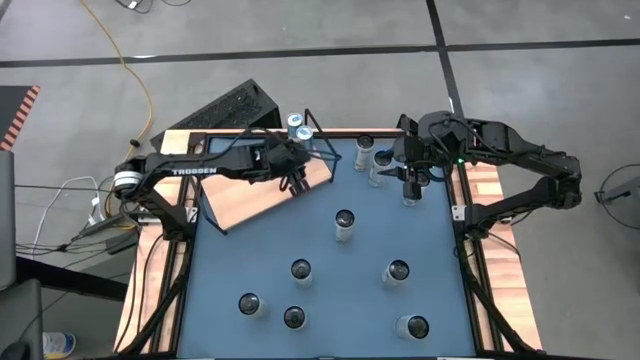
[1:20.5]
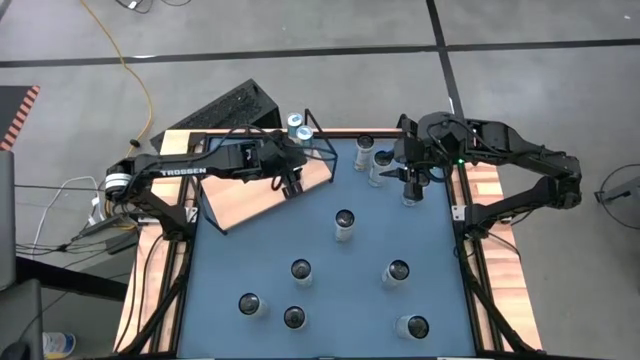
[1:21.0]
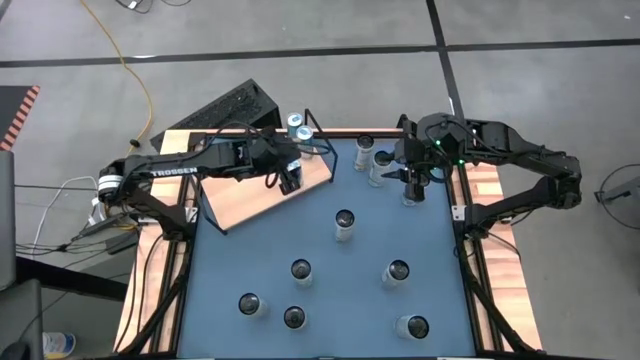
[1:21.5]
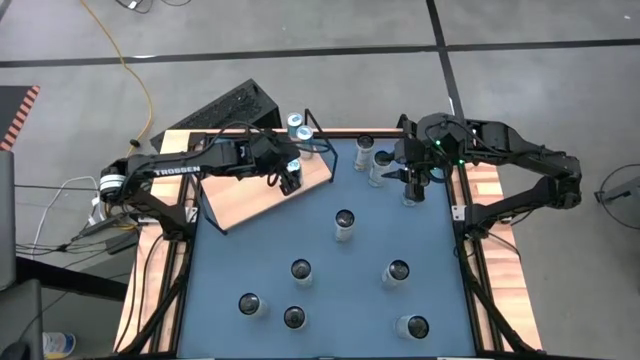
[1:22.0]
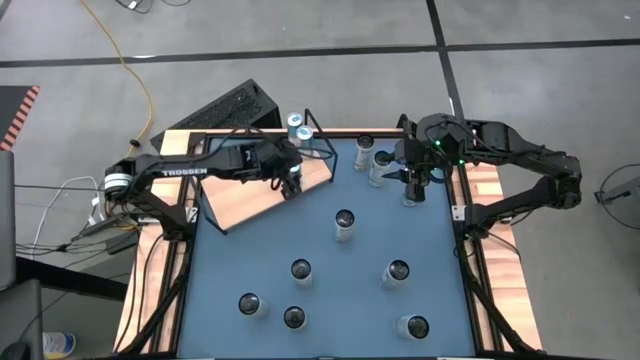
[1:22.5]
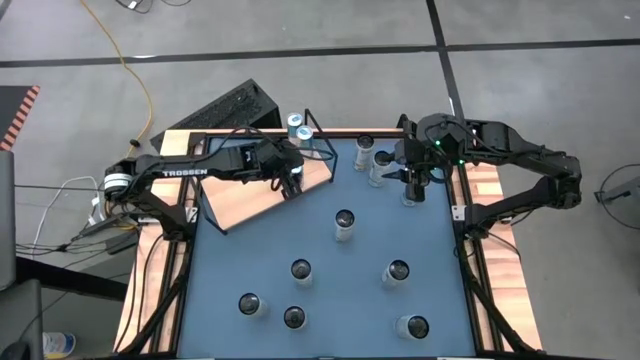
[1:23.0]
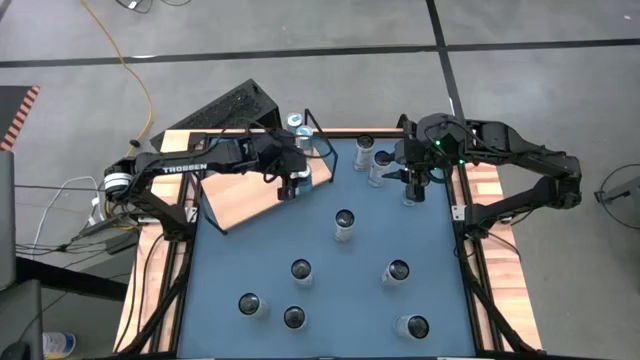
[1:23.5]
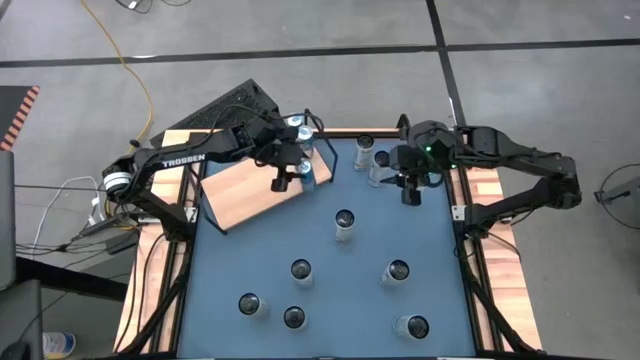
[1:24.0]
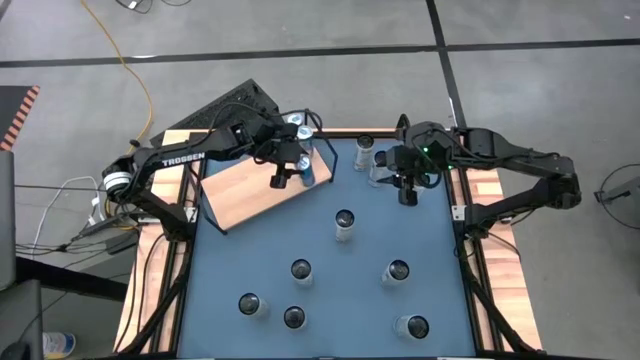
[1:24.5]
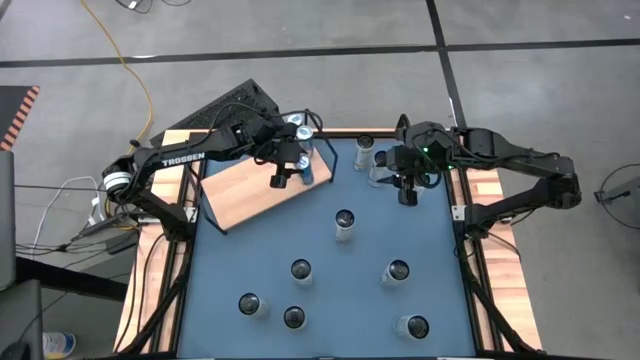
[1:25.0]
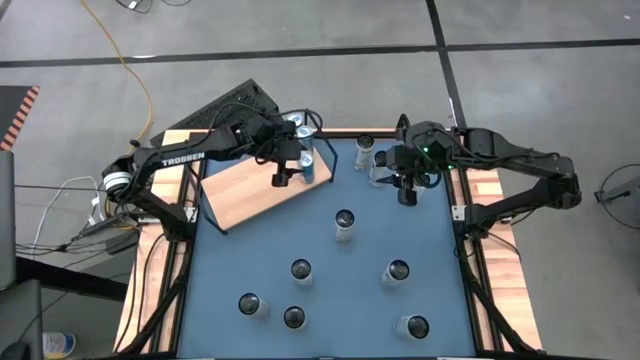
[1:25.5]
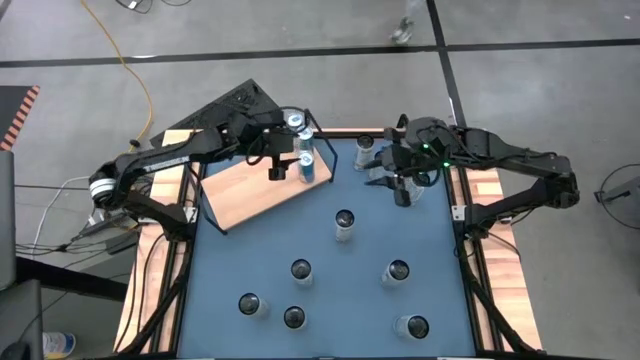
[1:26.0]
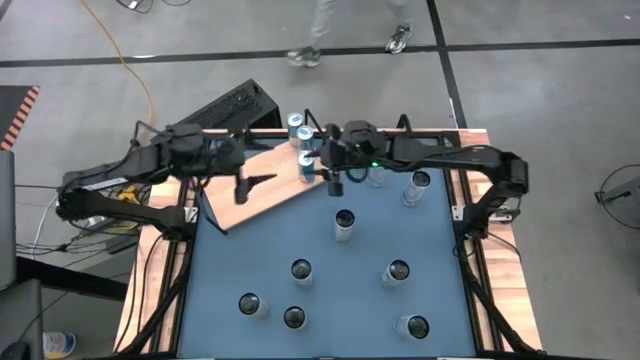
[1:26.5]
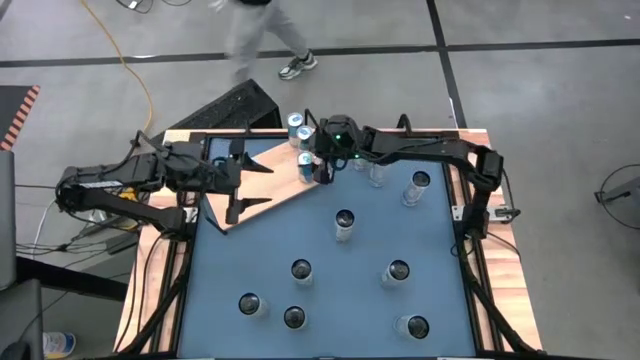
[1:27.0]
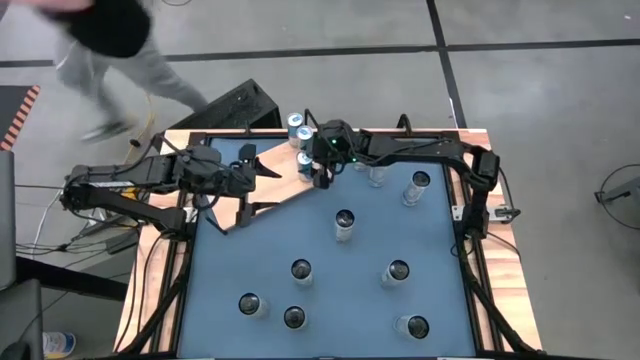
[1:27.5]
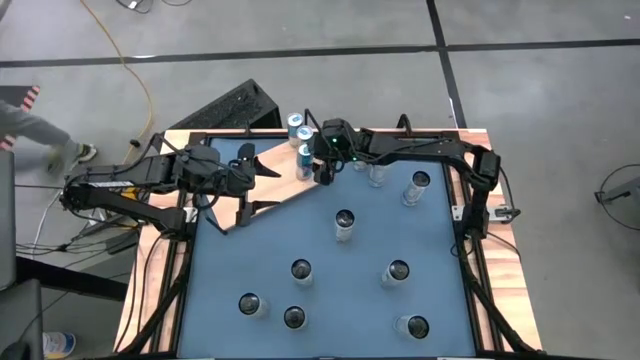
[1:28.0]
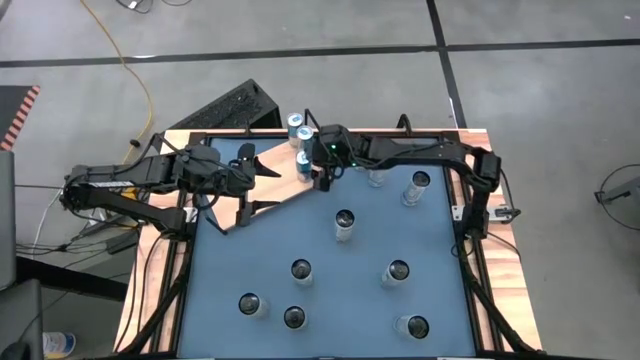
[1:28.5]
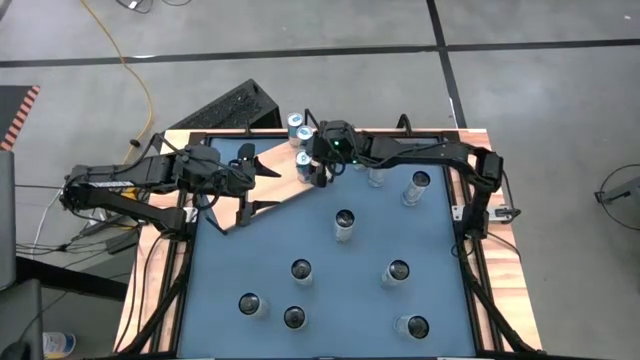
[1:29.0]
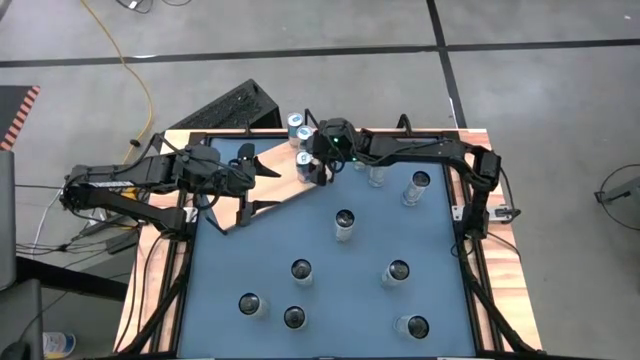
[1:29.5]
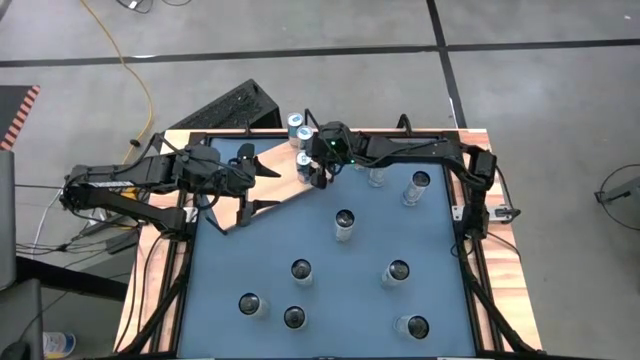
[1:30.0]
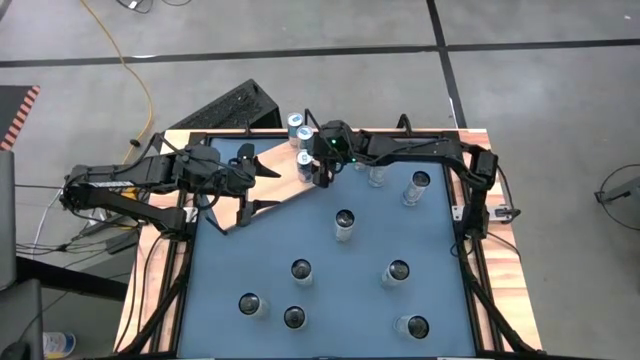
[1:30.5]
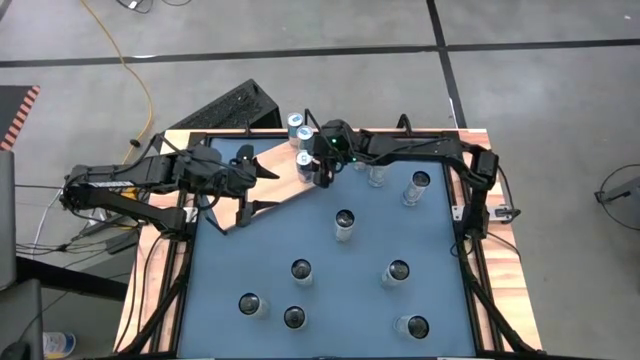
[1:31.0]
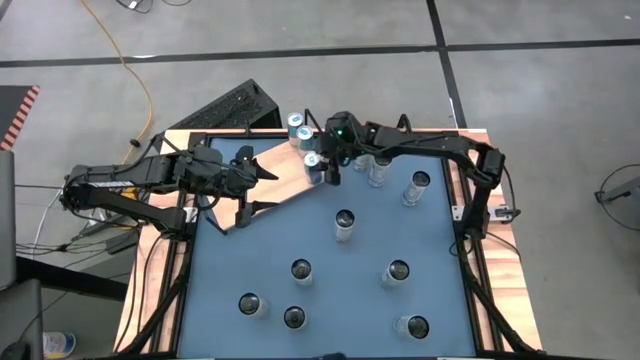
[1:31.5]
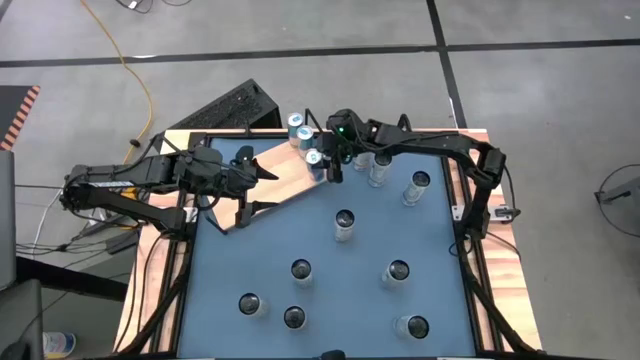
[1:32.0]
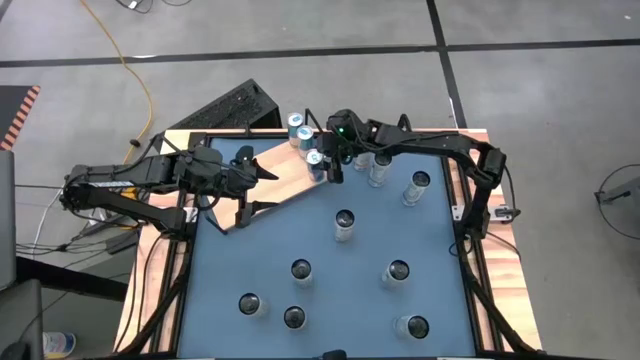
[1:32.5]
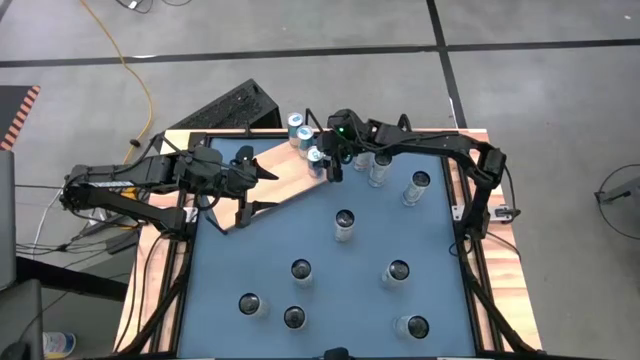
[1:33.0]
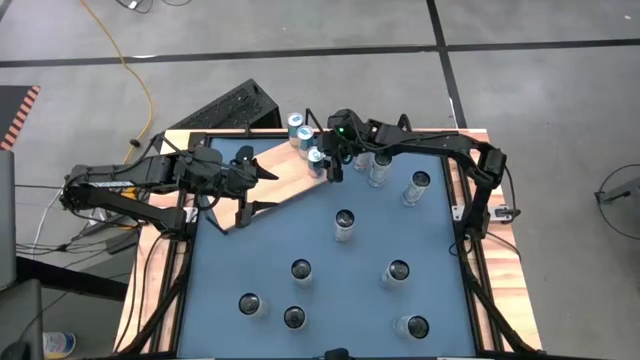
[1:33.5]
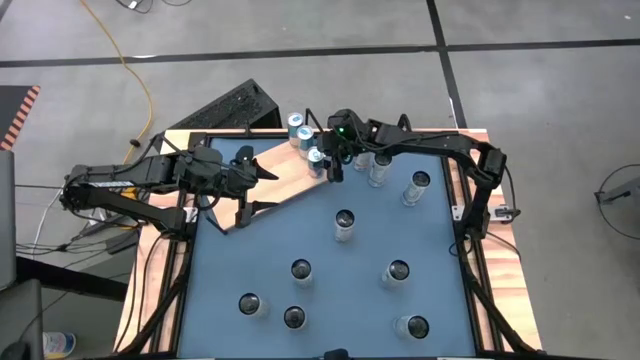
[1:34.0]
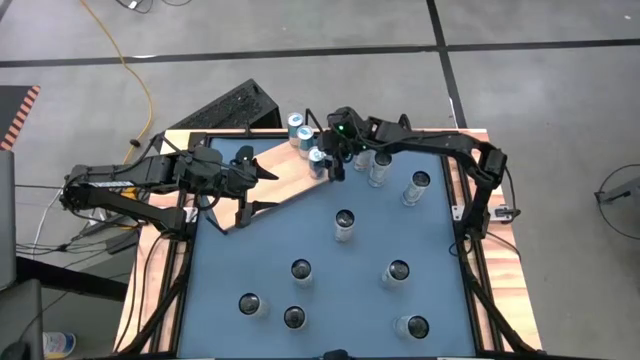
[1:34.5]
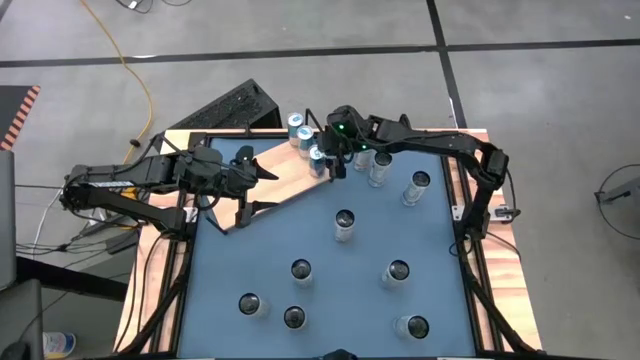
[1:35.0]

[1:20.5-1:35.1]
Task: Place canned beverage on shelf
Adjust the blue soda cans on the shelf

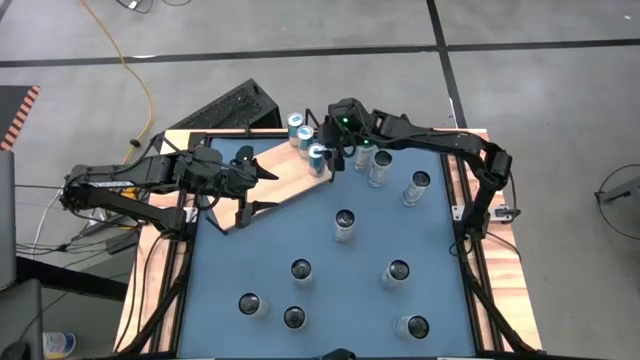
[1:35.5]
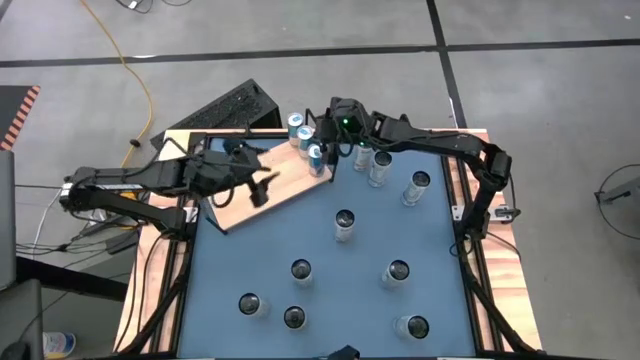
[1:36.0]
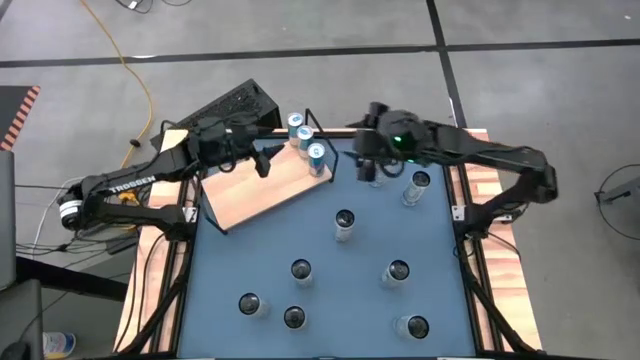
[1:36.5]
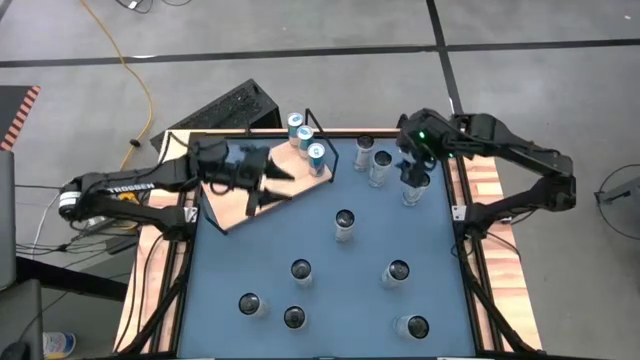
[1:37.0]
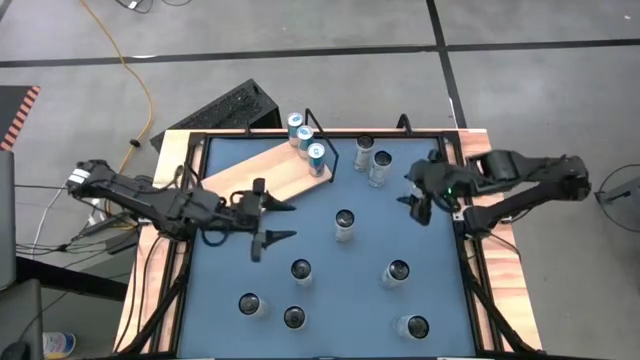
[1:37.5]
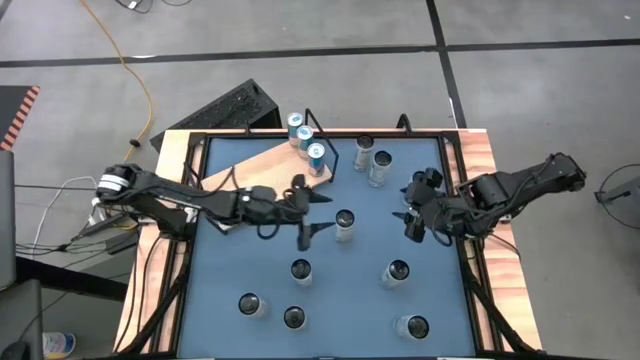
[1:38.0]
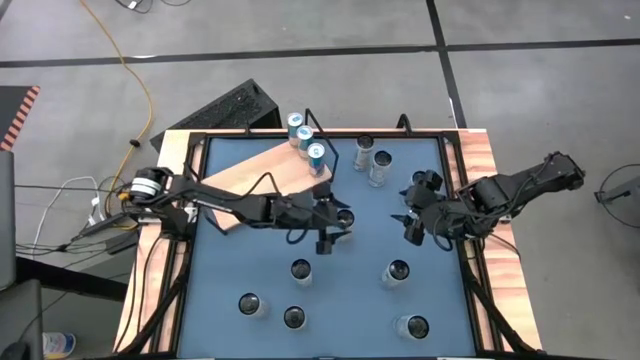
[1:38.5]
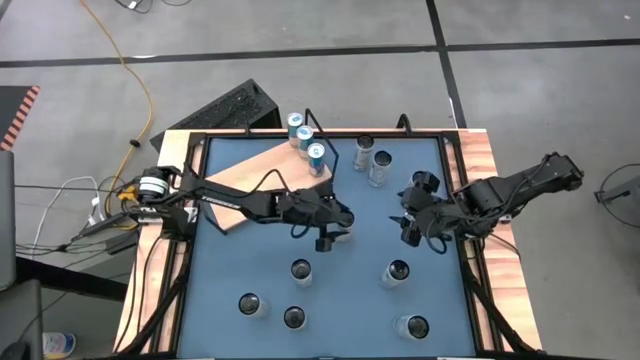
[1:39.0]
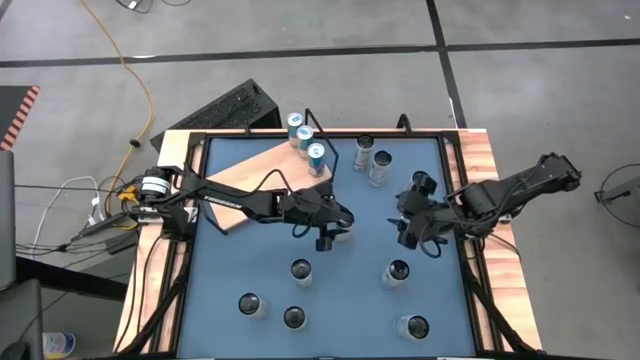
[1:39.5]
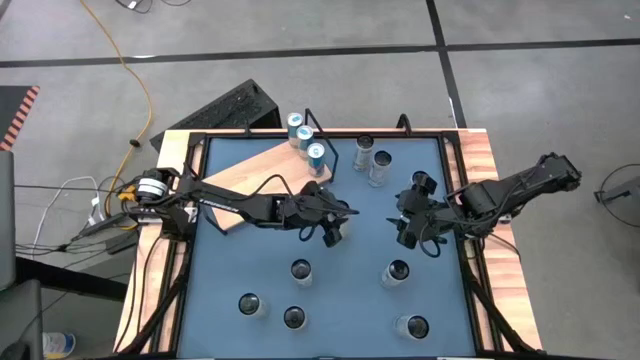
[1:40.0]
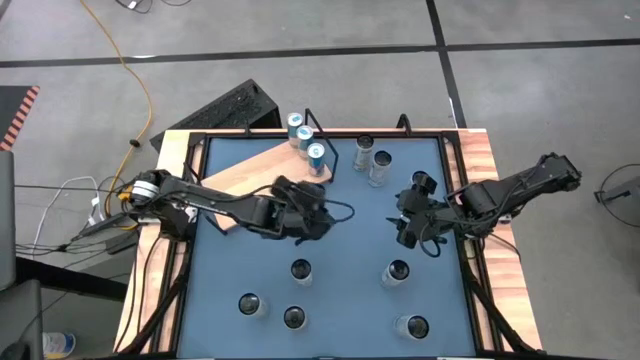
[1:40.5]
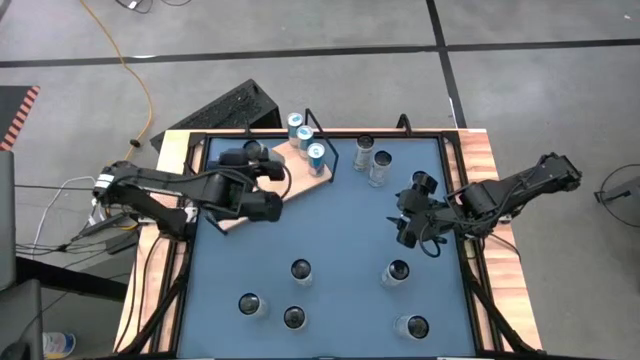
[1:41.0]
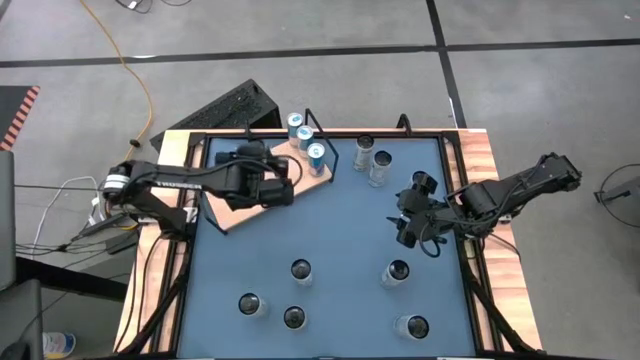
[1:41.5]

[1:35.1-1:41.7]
Put the middle white and yellow soda can on the shelf
